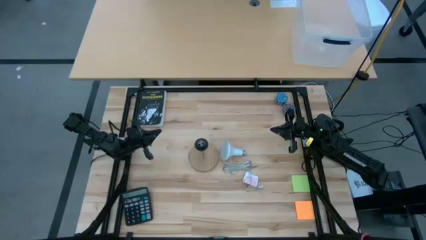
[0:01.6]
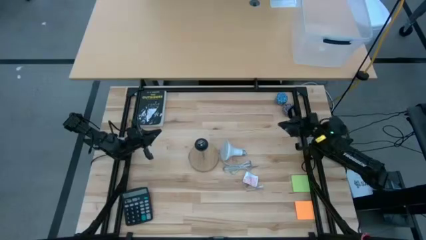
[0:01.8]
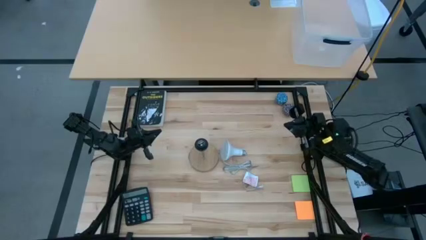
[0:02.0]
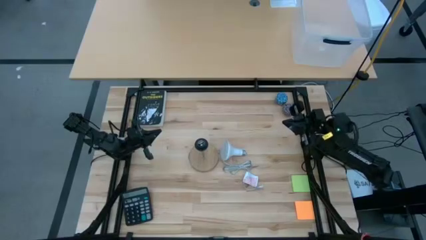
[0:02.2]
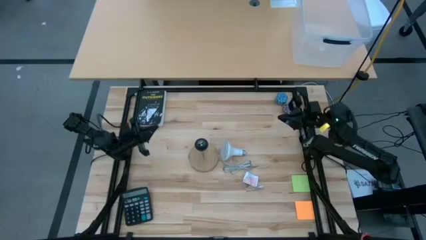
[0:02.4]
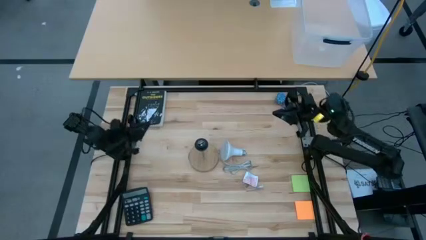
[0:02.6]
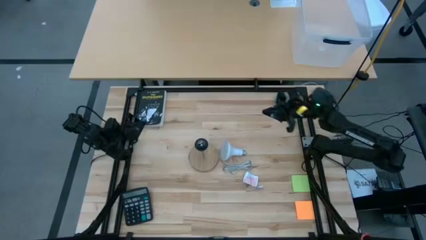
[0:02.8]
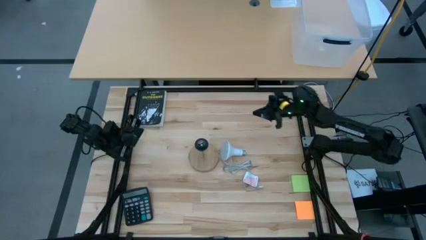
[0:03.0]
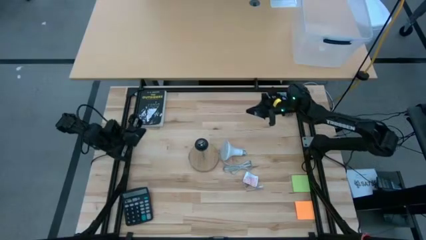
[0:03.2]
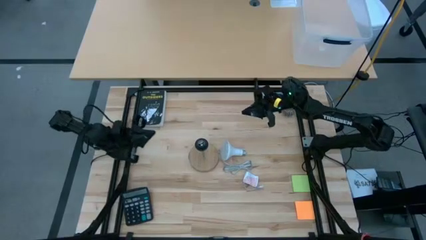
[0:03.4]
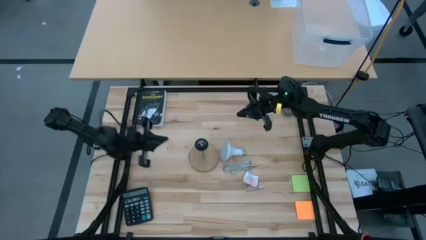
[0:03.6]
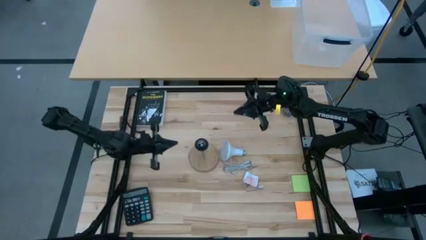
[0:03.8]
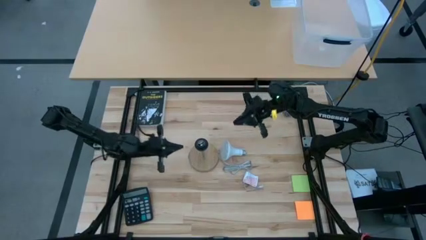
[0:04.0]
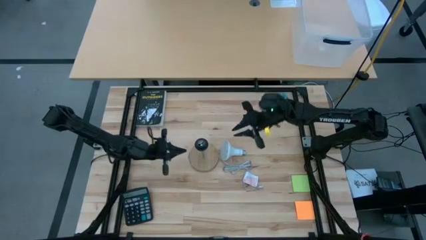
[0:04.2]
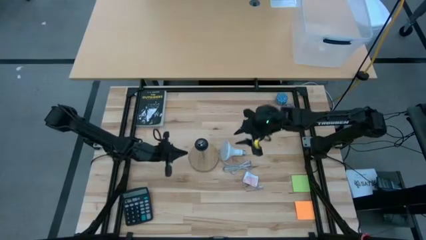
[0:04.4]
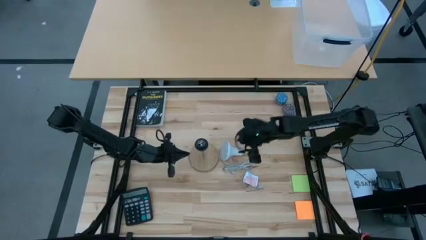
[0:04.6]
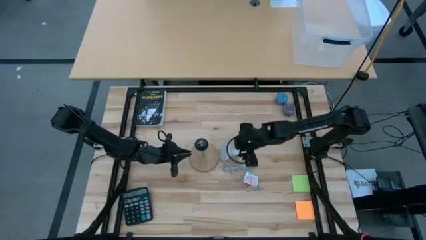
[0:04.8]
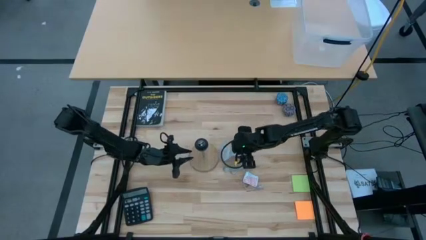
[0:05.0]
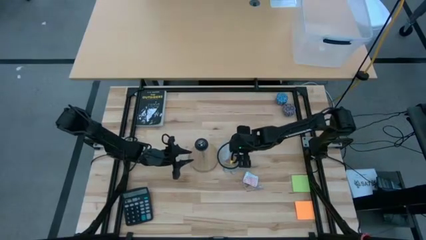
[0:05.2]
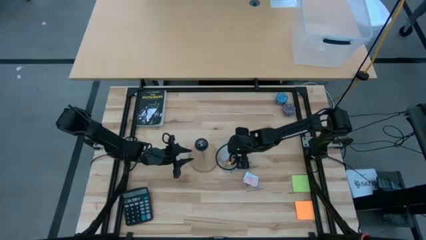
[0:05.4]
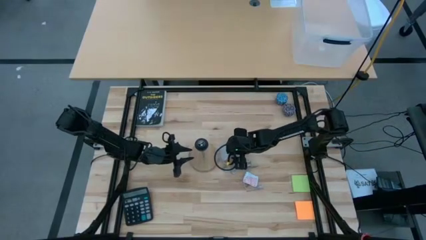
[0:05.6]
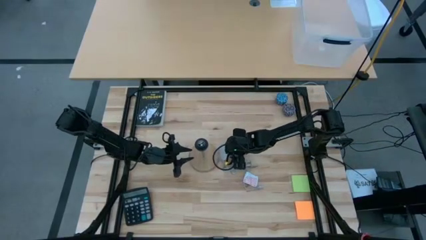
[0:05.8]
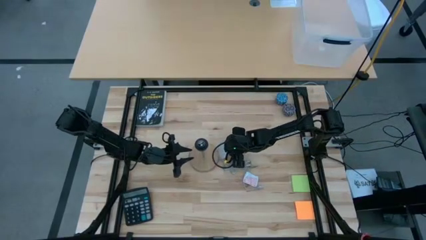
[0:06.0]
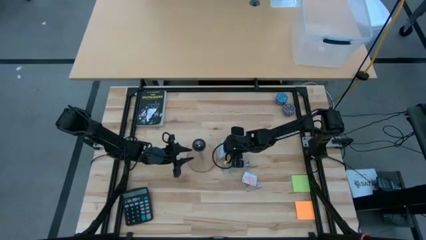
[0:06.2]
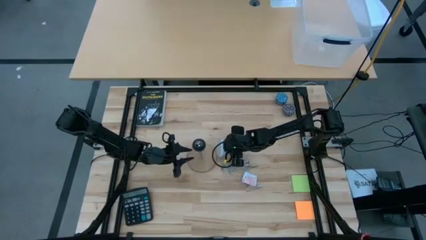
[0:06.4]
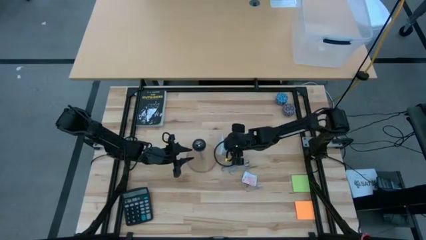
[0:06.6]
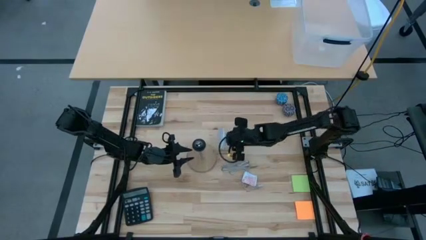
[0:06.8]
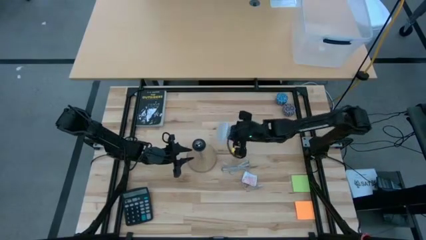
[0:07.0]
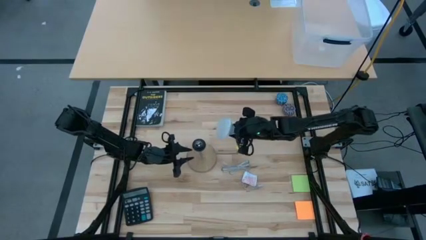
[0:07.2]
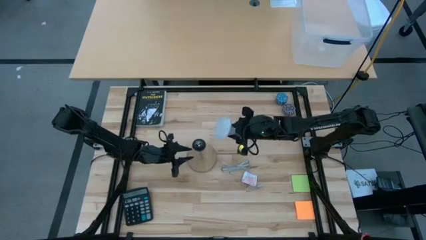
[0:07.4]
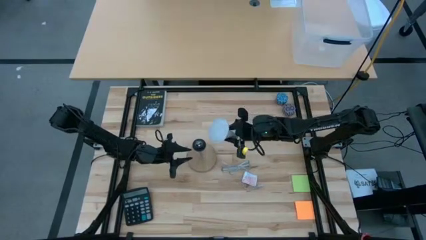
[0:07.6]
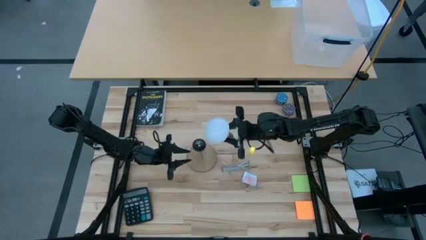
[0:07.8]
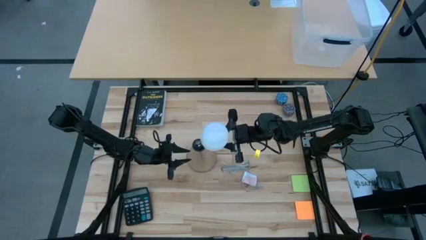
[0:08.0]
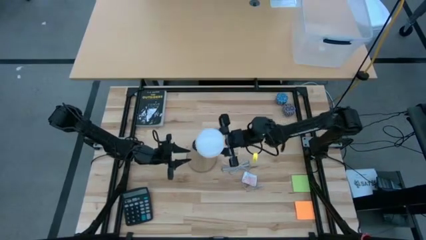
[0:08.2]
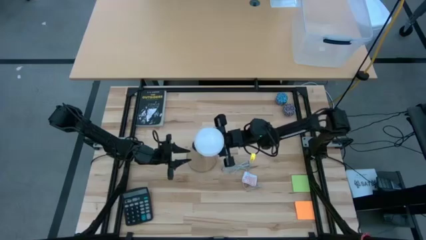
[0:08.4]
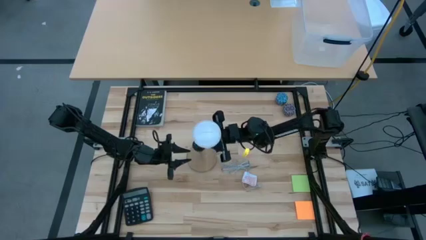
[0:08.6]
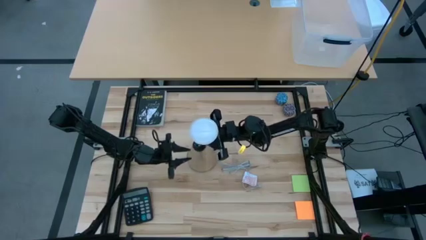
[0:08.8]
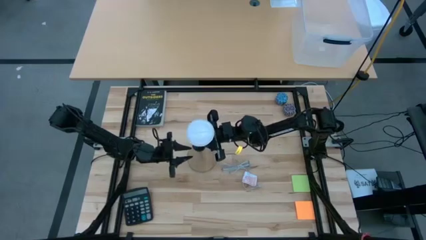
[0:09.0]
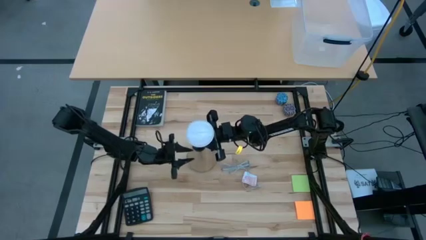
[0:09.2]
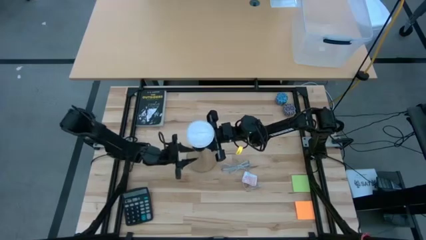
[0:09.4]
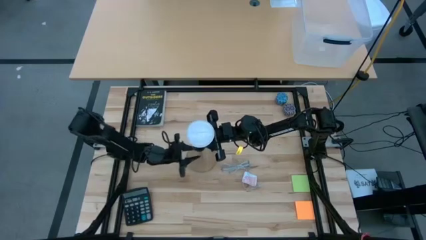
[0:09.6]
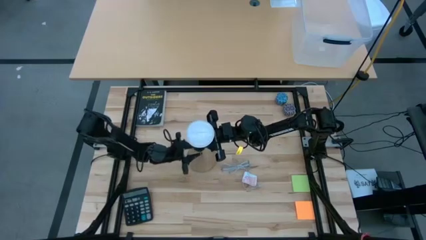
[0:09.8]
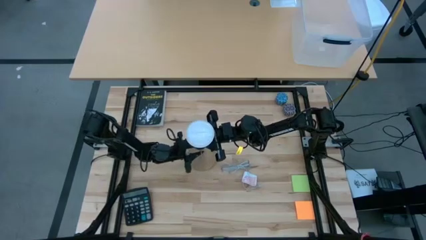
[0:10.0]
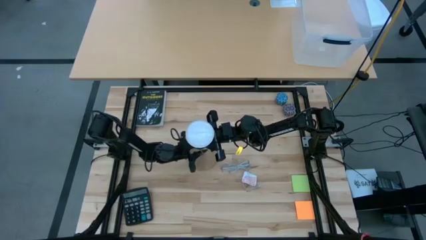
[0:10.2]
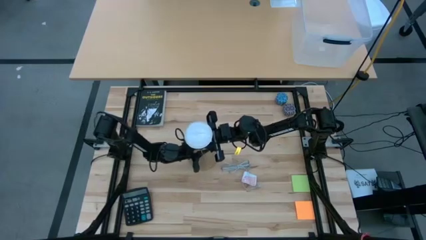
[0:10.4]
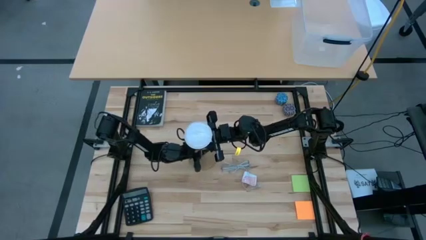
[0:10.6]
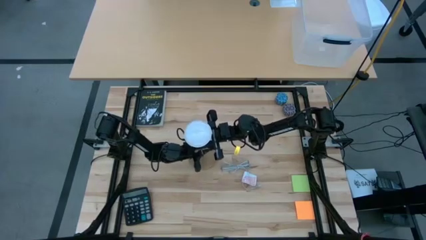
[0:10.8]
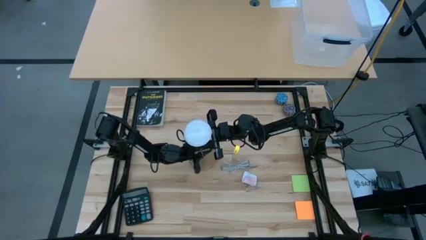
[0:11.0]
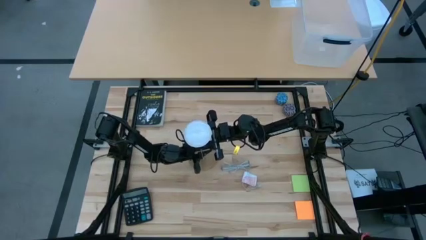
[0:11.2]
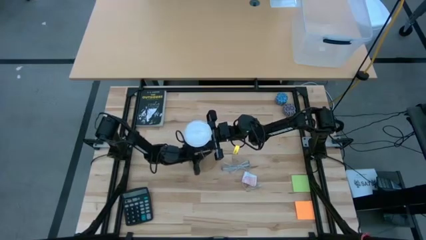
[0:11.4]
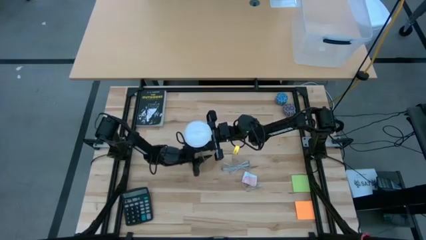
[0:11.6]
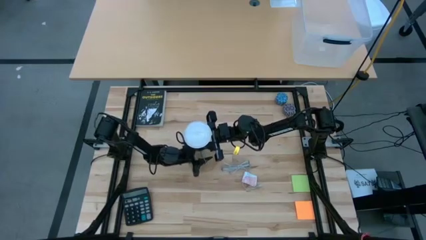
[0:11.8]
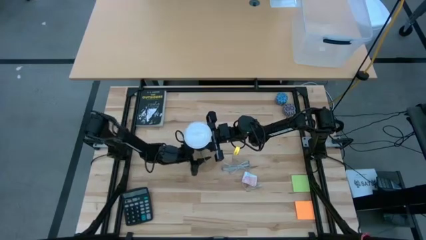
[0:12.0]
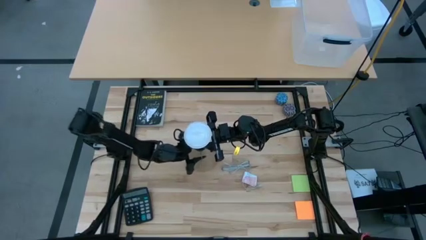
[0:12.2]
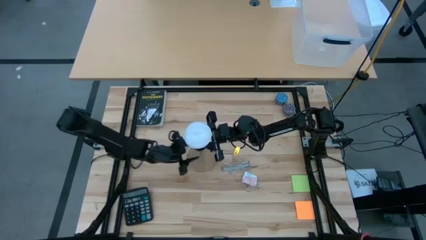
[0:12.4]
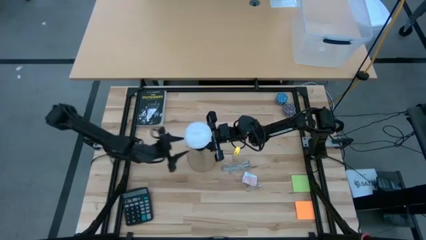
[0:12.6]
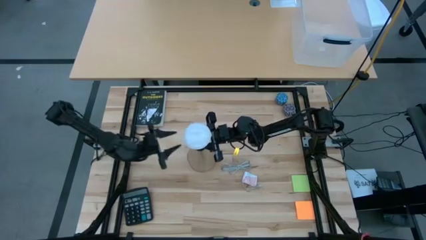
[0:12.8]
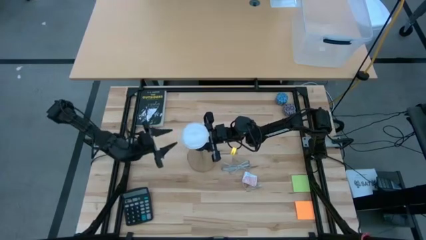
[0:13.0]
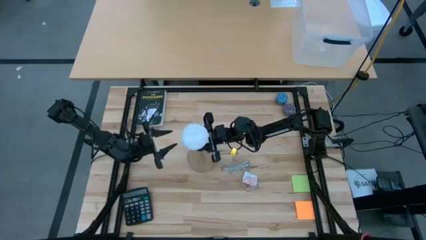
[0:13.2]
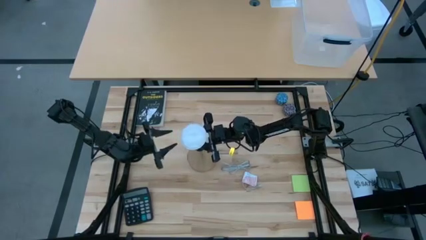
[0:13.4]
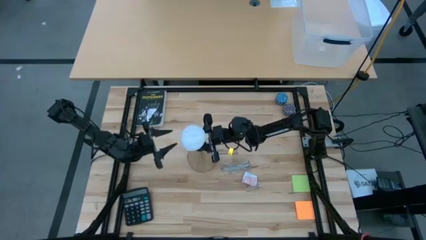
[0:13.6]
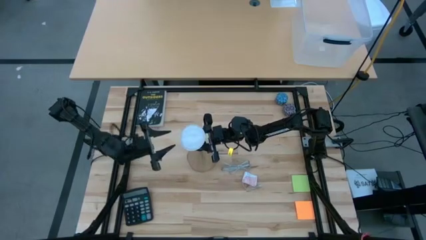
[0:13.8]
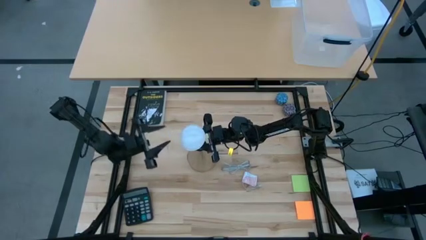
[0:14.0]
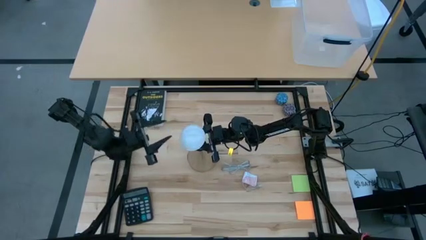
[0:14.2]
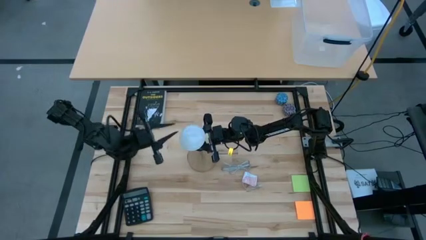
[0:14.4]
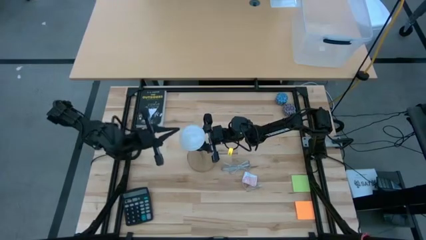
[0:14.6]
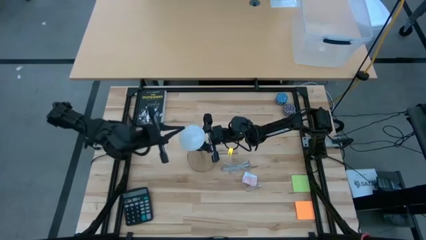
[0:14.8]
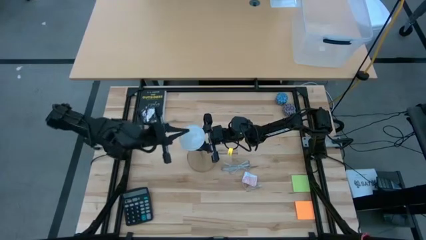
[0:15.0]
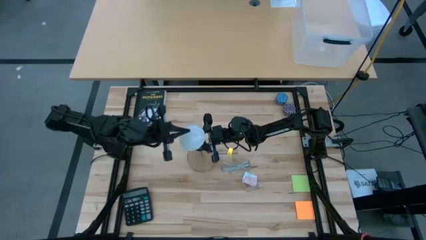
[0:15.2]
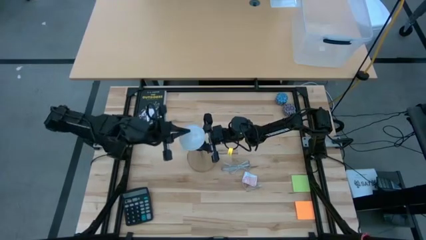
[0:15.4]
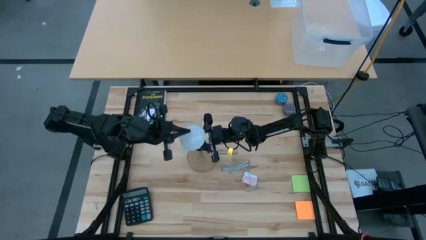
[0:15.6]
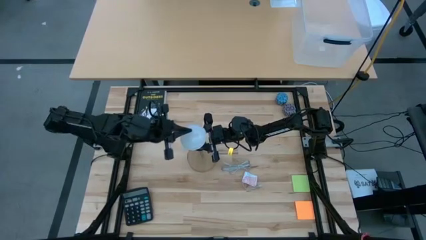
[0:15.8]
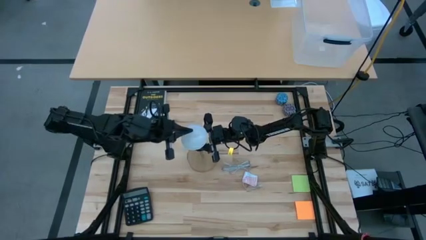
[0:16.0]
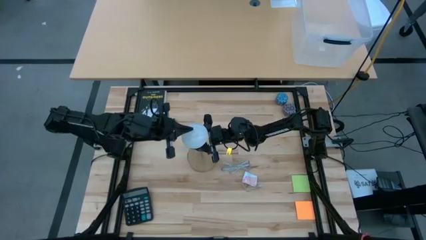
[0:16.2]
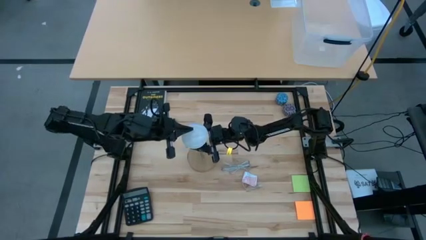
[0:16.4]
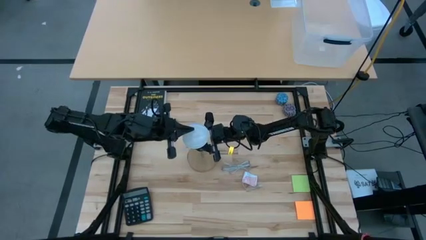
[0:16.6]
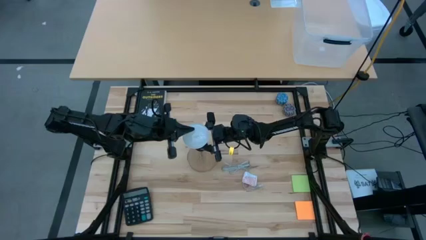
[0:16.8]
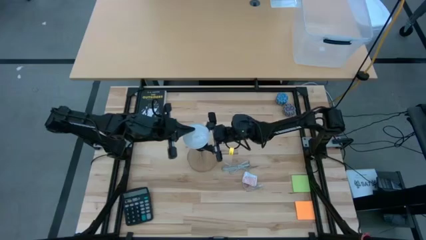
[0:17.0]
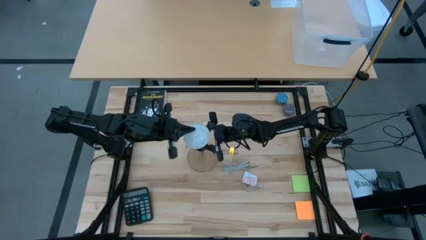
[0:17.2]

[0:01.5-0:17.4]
Task: Screw lightbulb
Insert the lightbulb into the lamp socket
